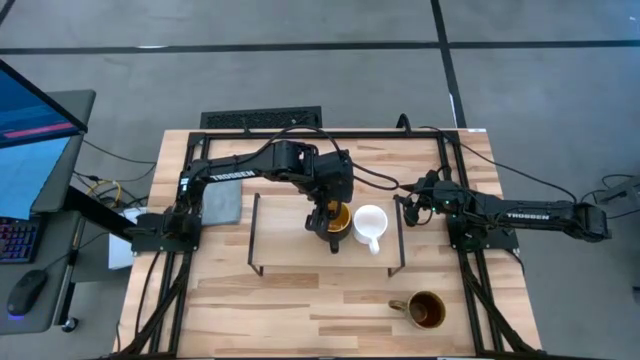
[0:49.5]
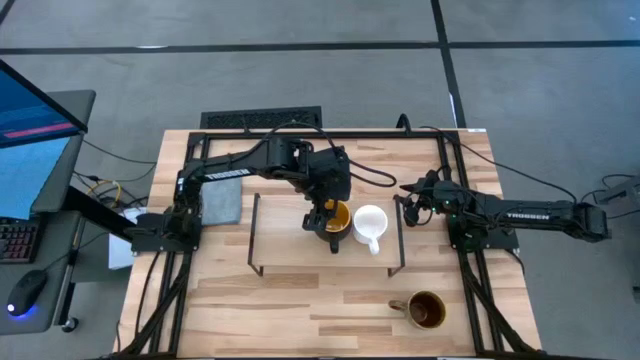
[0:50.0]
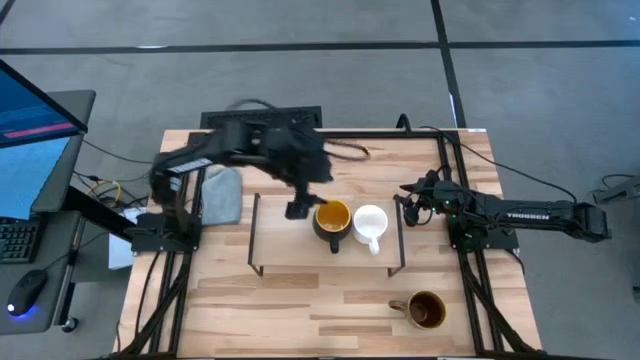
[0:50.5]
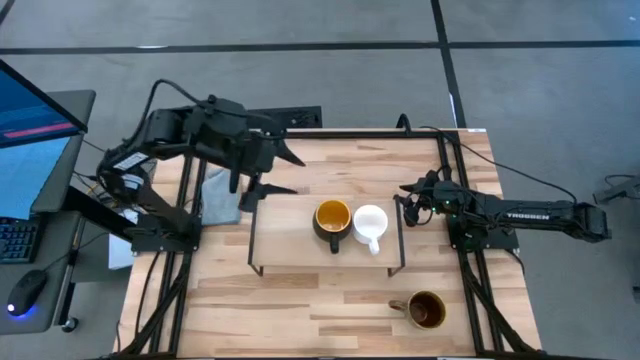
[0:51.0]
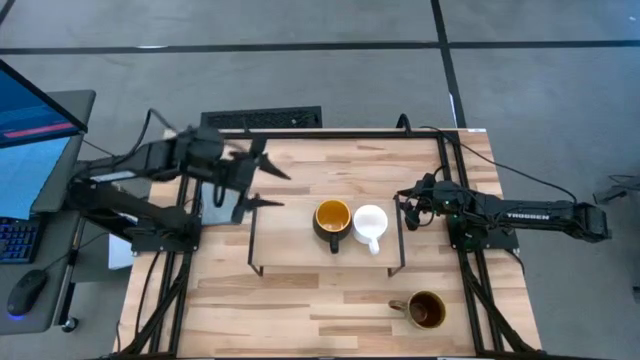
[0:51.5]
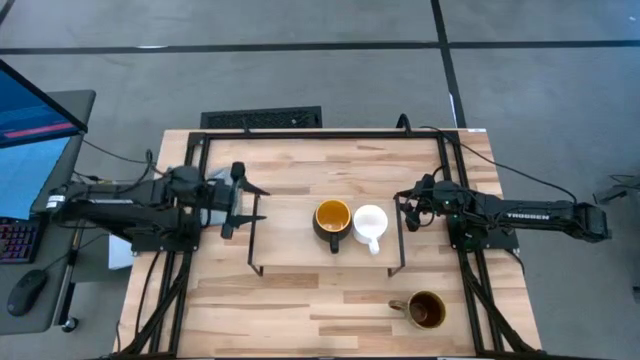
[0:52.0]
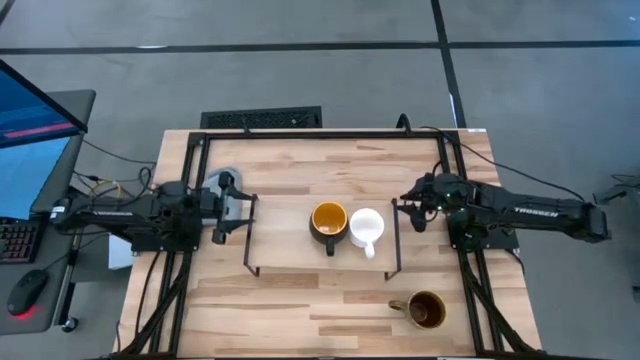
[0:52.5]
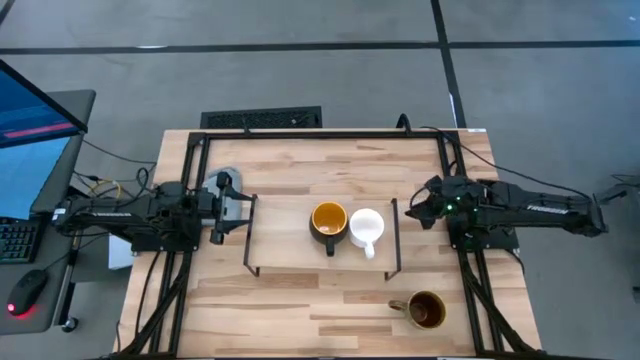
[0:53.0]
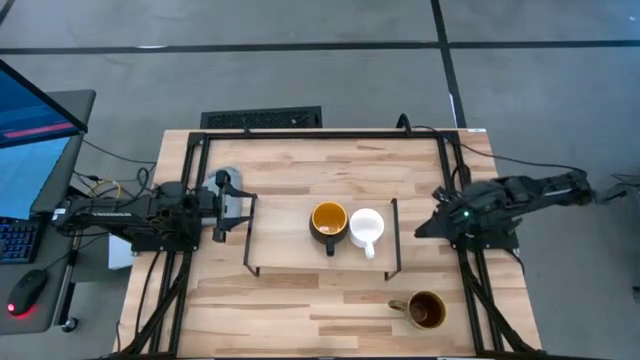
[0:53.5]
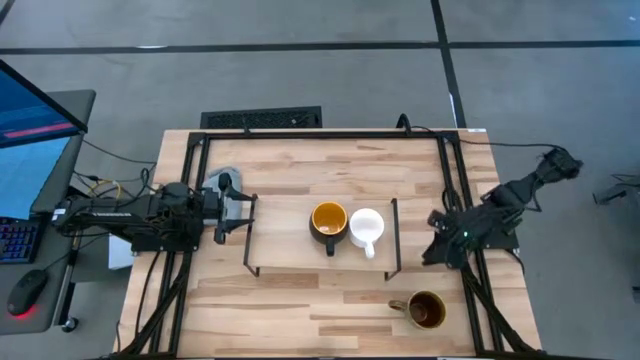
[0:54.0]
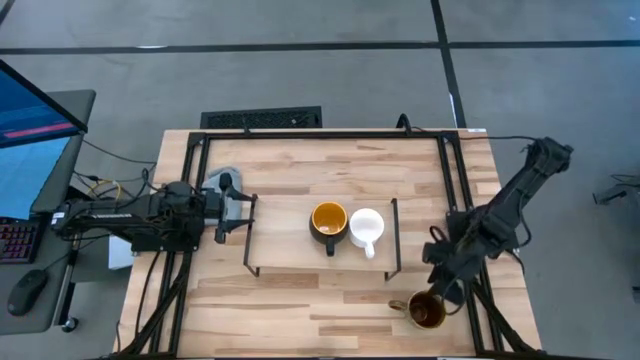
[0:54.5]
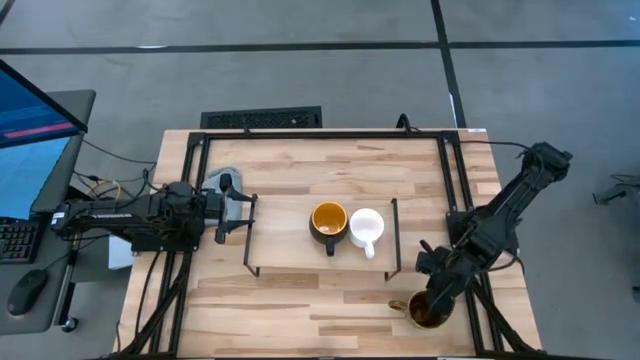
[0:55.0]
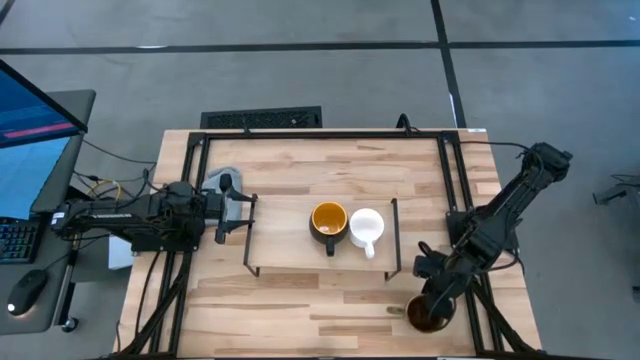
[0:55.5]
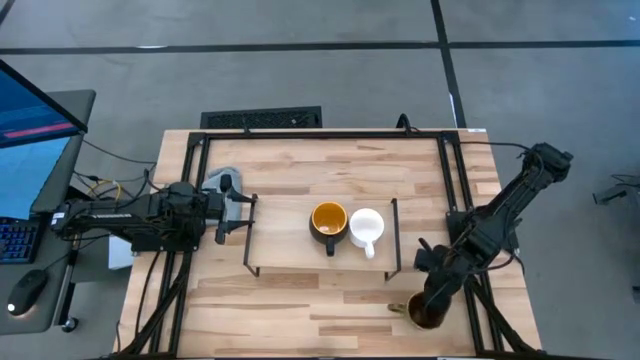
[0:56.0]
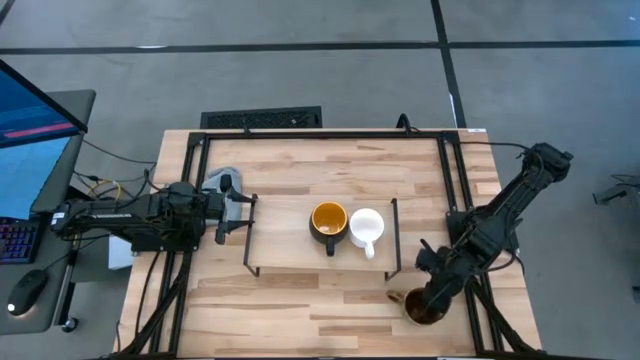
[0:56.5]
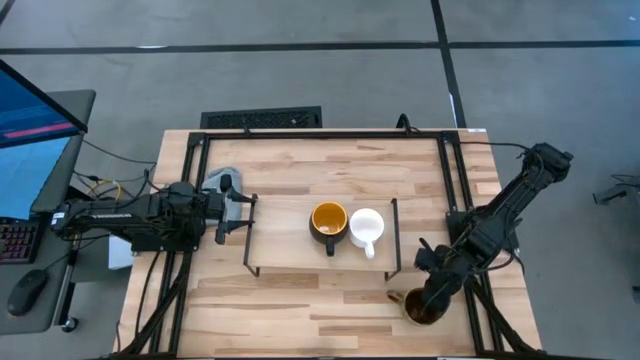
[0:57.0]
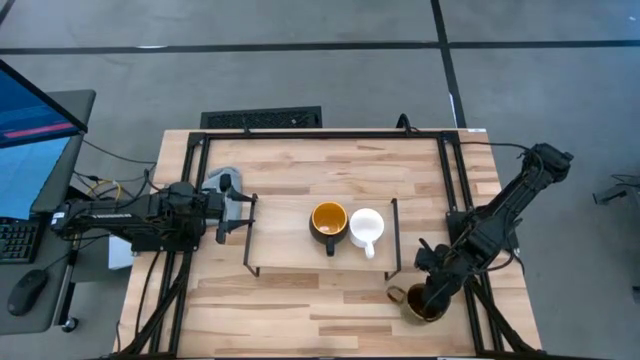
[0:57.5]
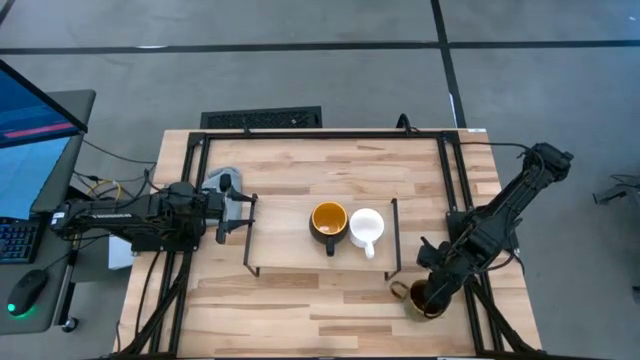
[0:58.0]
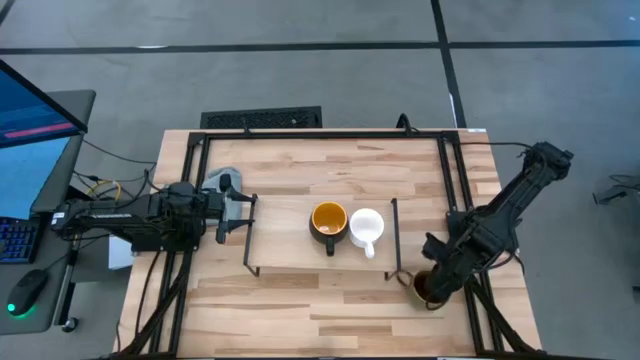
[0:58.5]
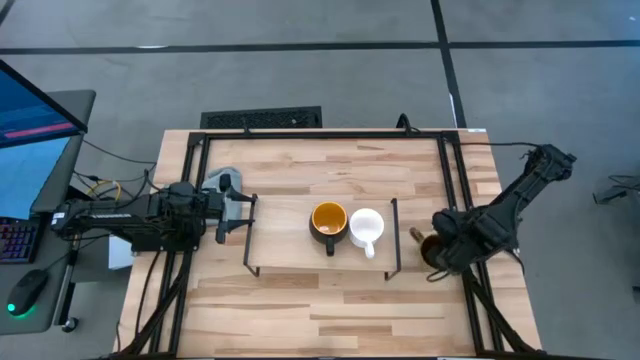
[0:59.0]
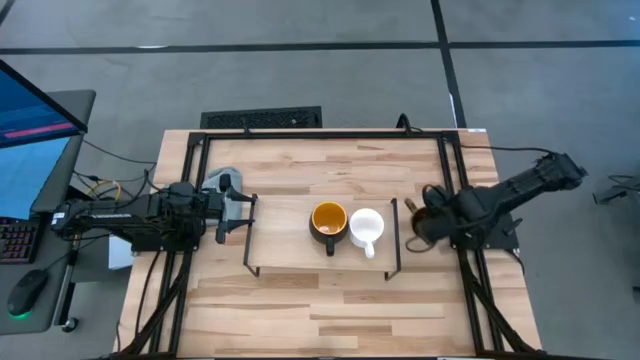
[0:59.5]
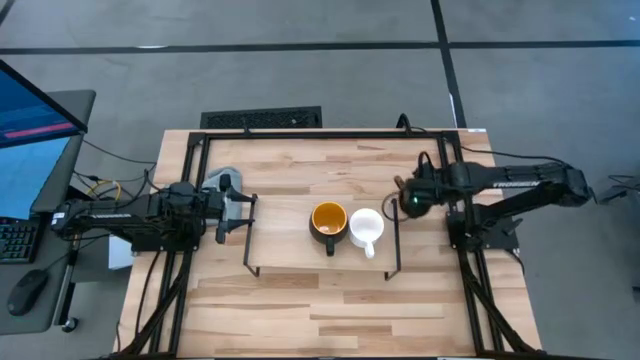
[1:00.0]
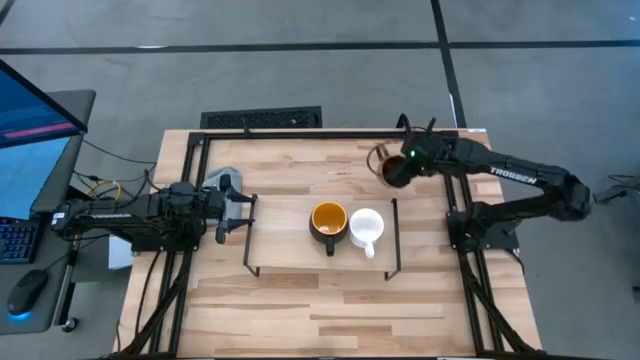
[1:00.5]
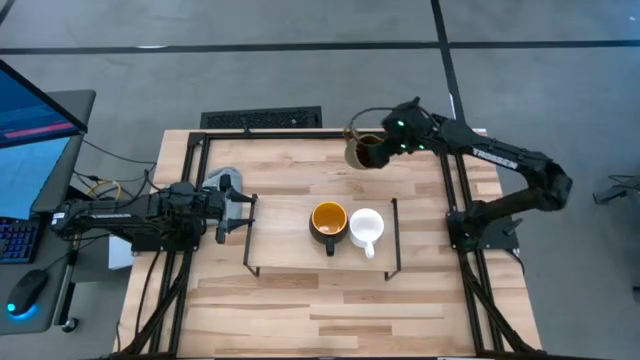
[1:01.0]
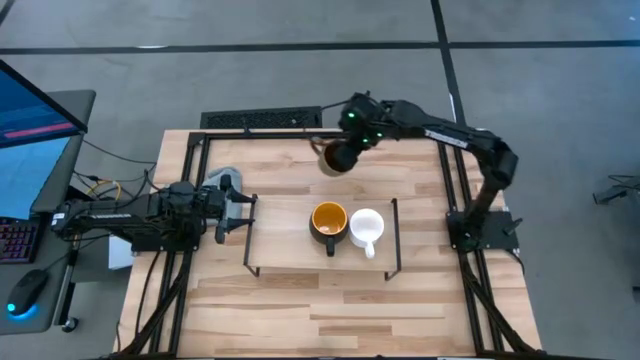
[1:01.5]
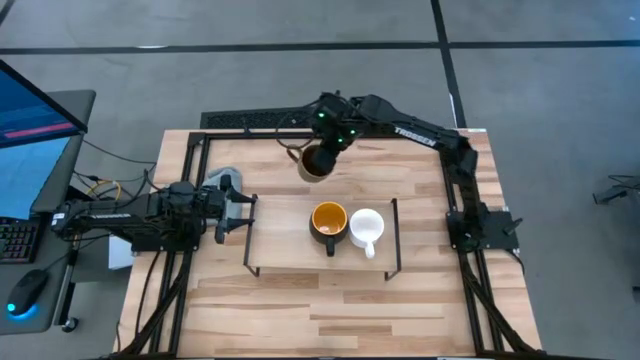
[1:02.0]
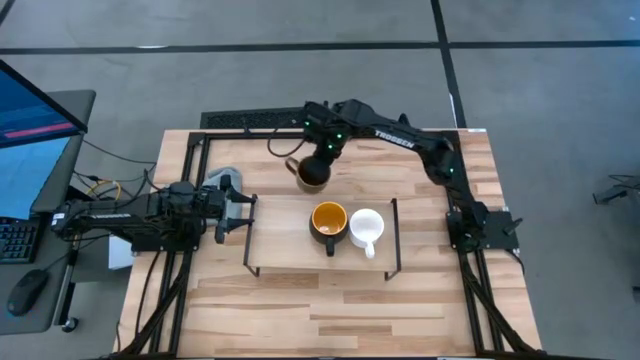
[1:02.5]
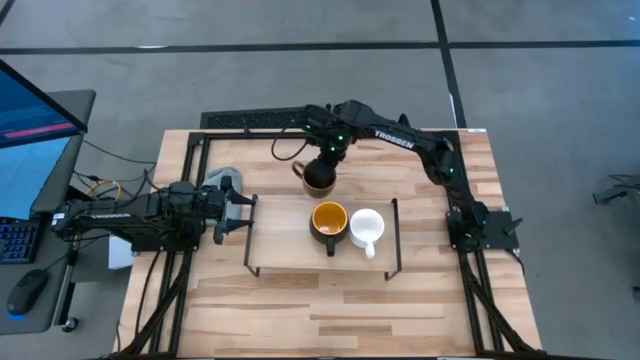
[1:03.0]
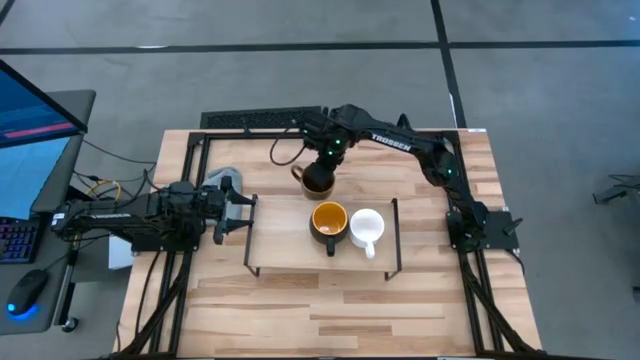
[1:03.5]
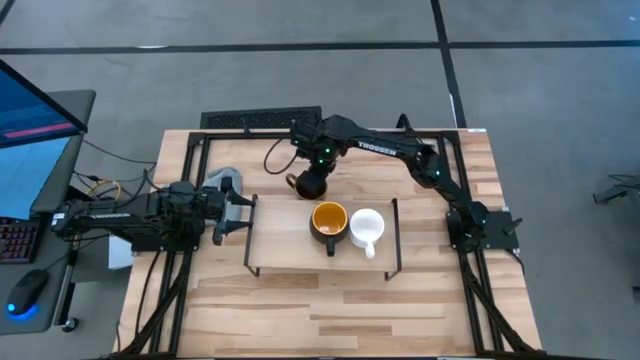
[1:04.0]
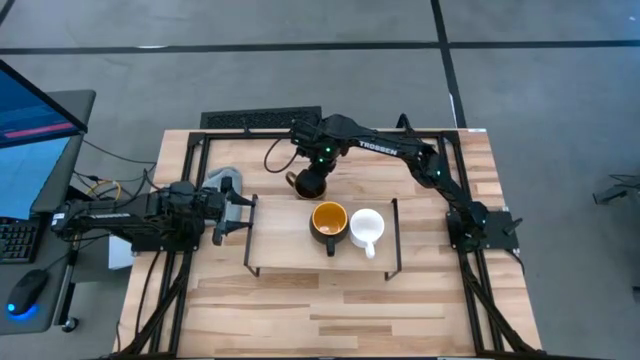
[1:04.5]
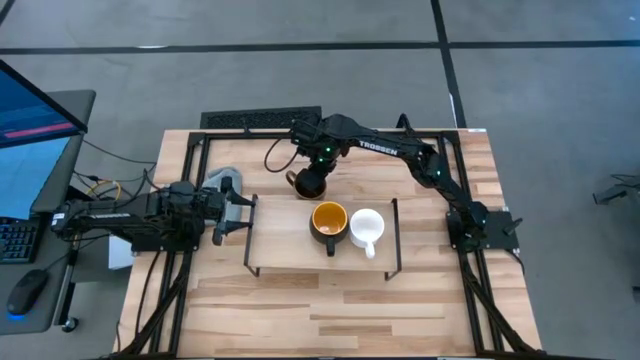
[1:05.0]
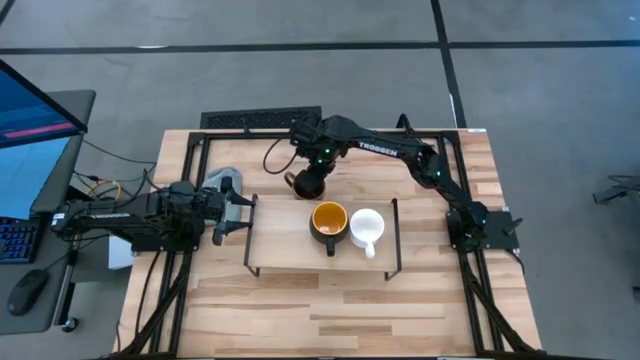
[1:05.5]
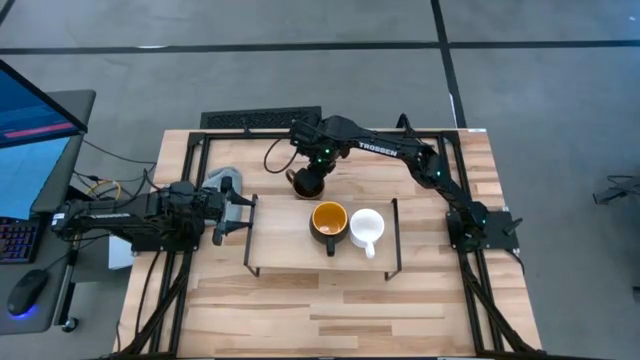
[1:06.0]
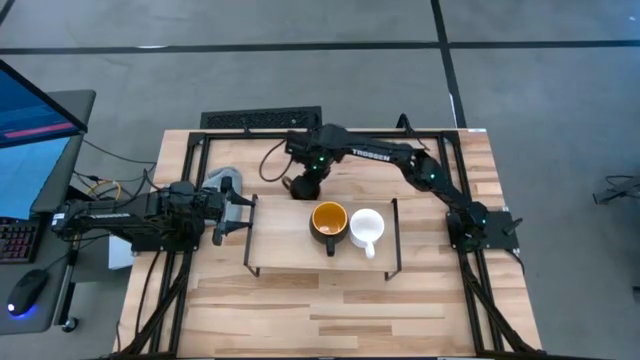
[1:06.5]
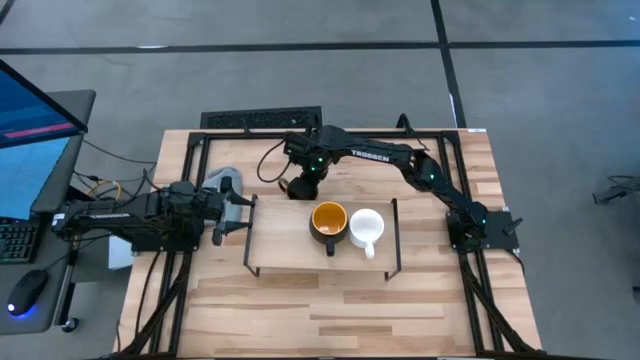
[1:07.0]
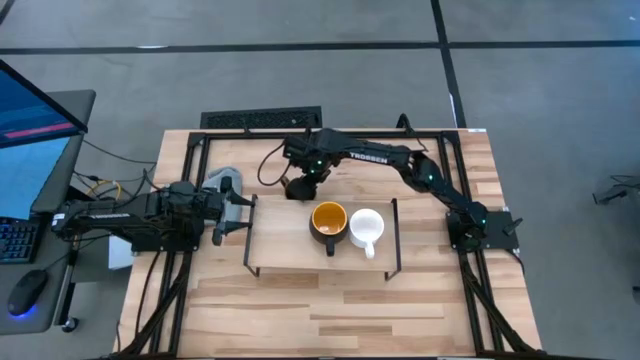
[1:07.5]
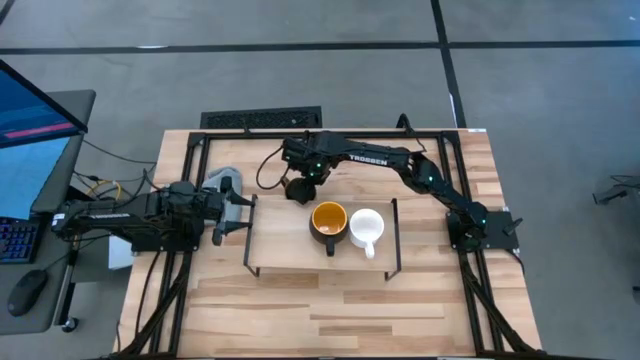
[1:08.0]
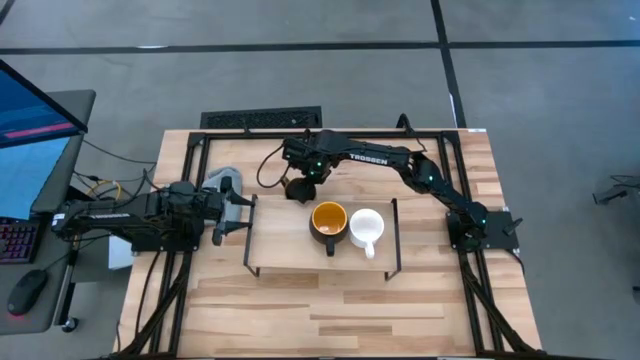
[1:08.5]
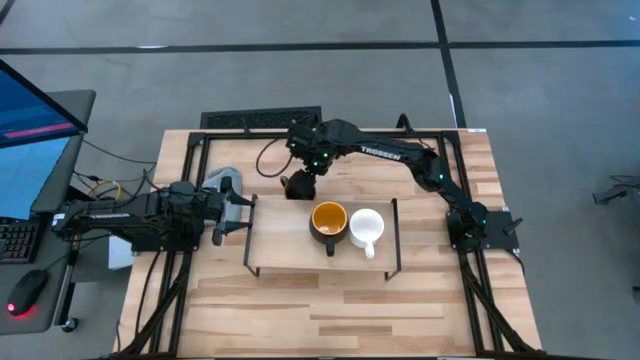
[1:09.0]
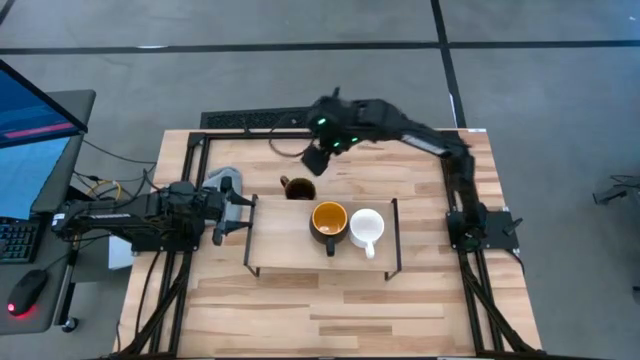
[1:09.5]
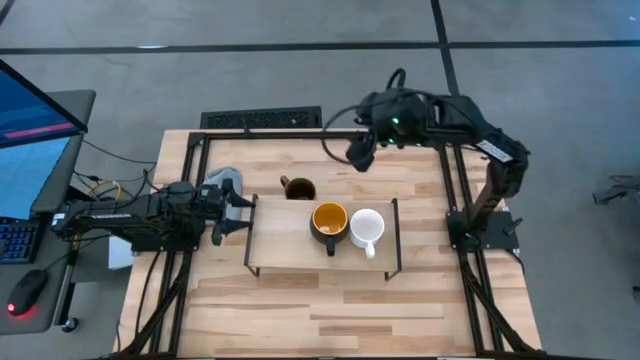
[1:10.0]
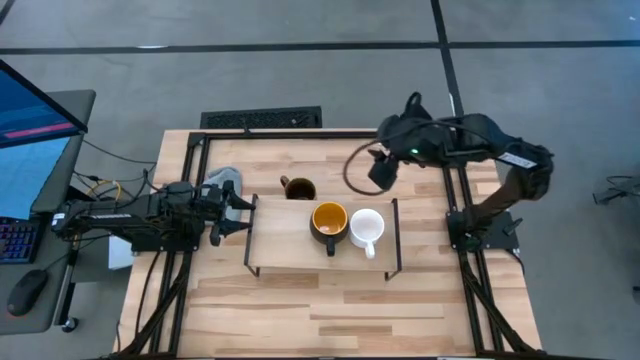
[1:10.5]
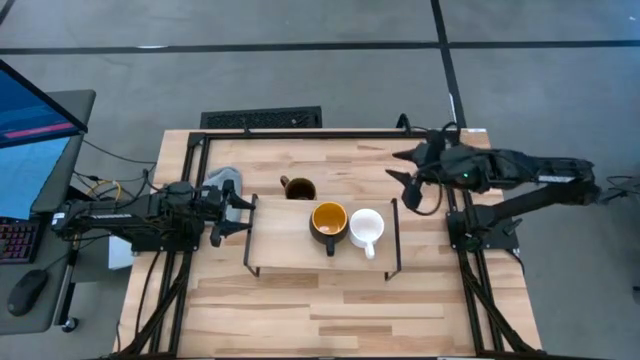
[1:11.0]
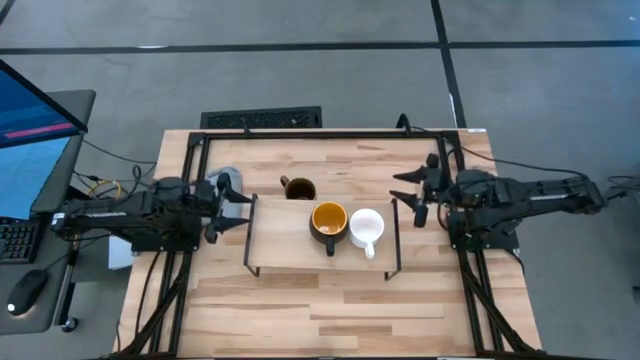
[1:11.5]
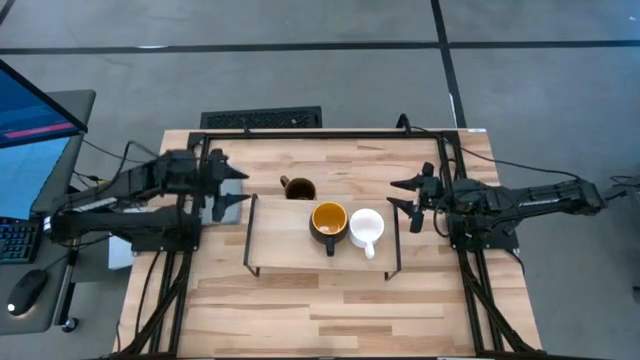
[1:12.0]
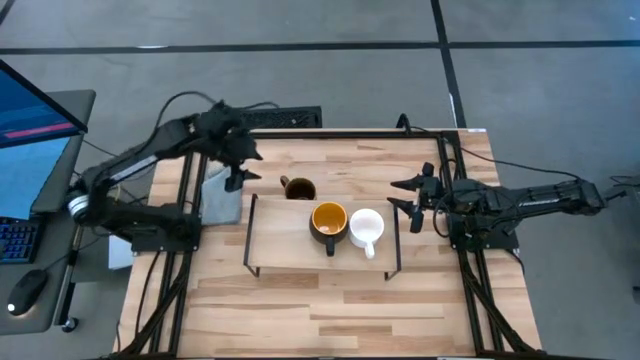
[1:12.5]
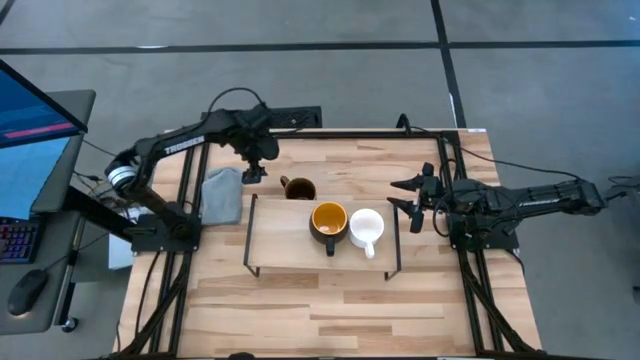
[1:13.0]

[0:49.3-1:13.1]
Task: Stack small to large cups/mugs on shelf
Put the brown mug on the shelf
